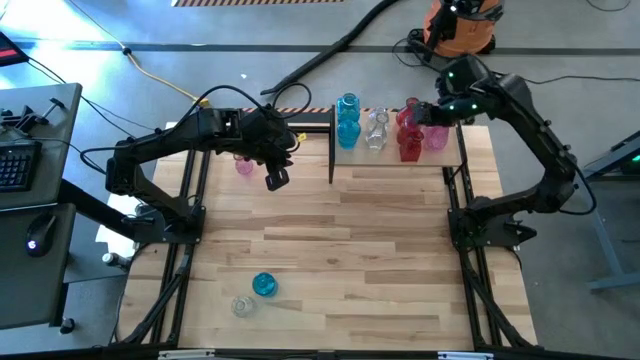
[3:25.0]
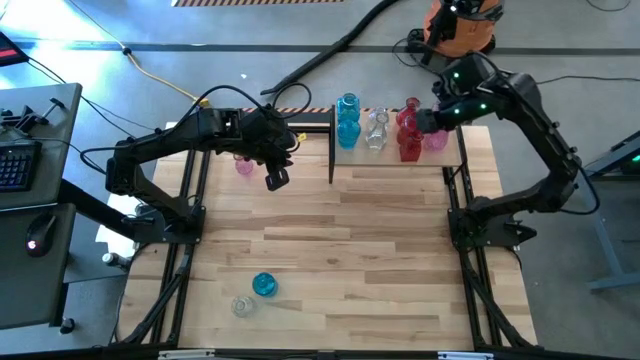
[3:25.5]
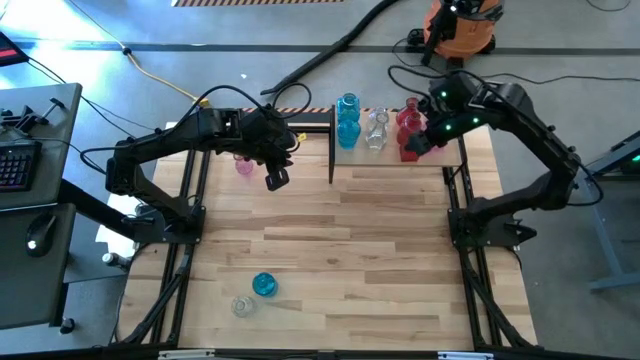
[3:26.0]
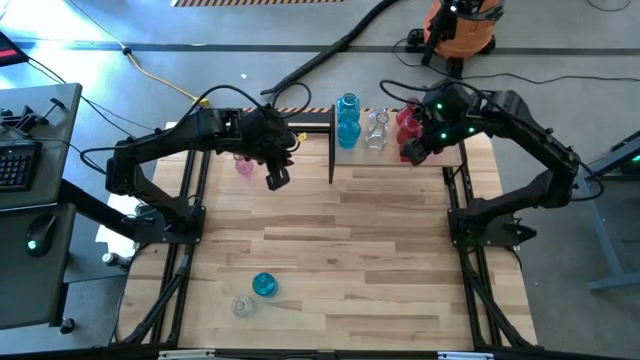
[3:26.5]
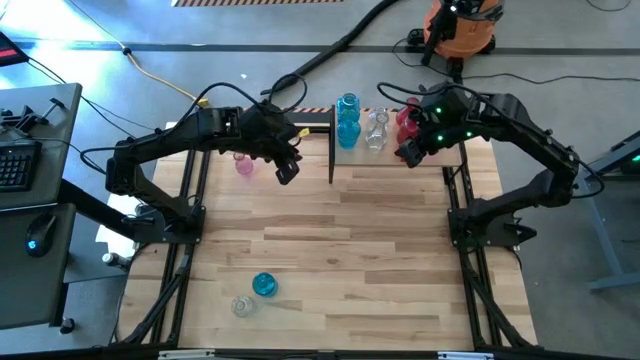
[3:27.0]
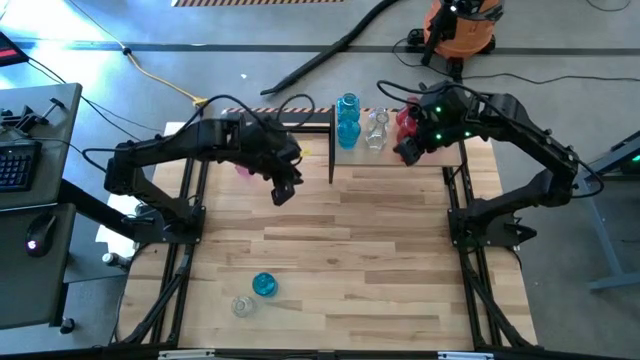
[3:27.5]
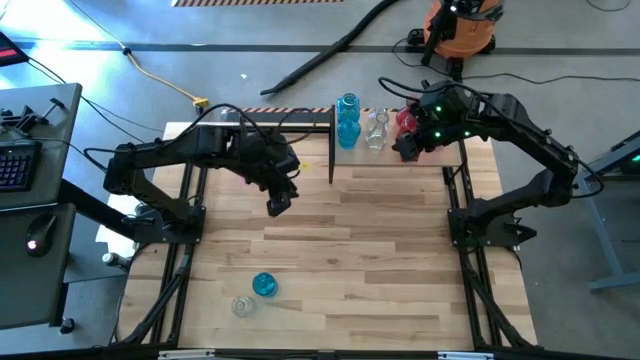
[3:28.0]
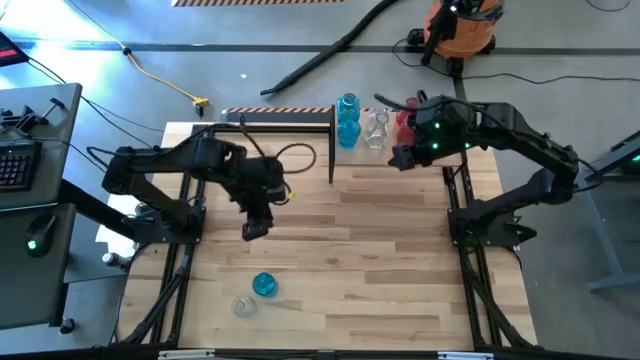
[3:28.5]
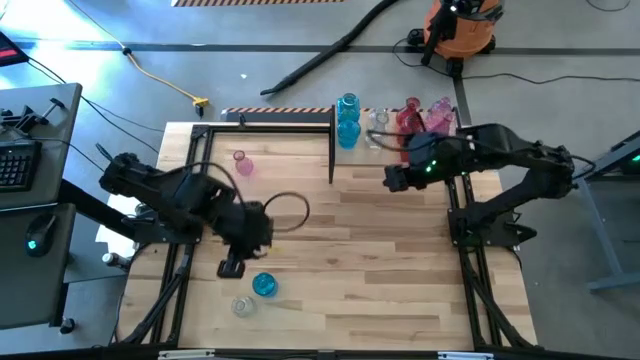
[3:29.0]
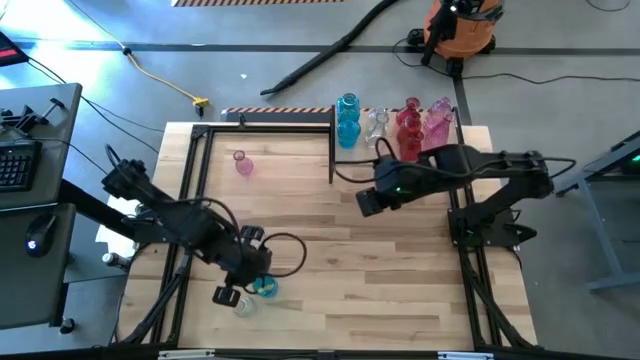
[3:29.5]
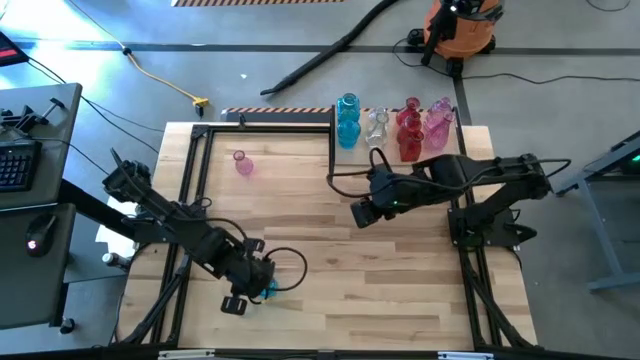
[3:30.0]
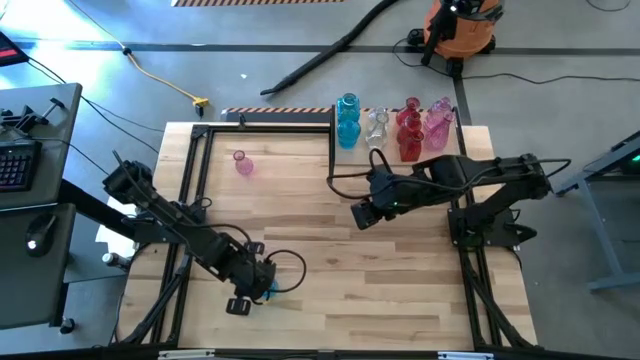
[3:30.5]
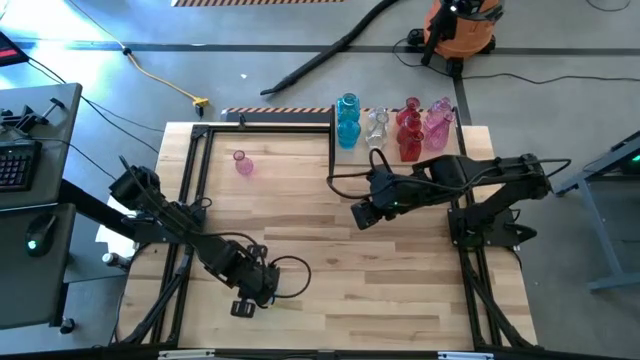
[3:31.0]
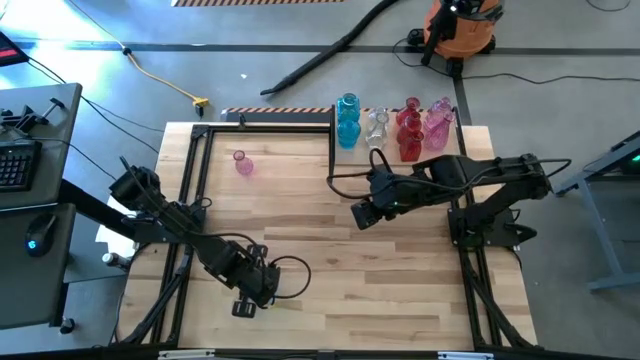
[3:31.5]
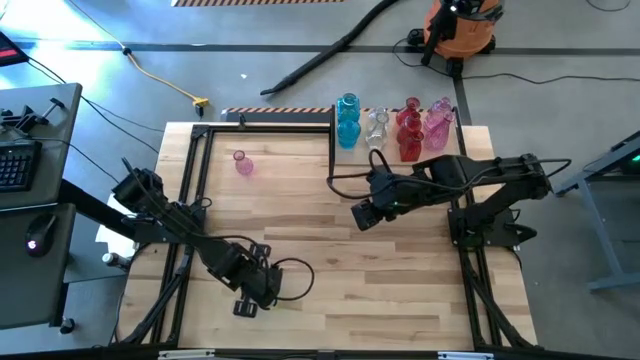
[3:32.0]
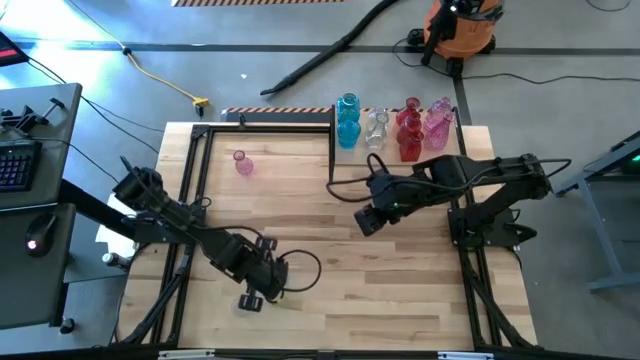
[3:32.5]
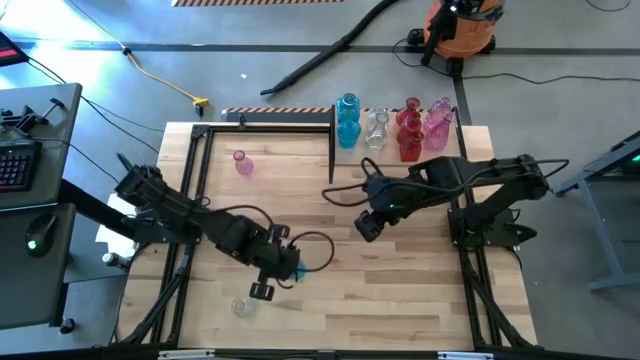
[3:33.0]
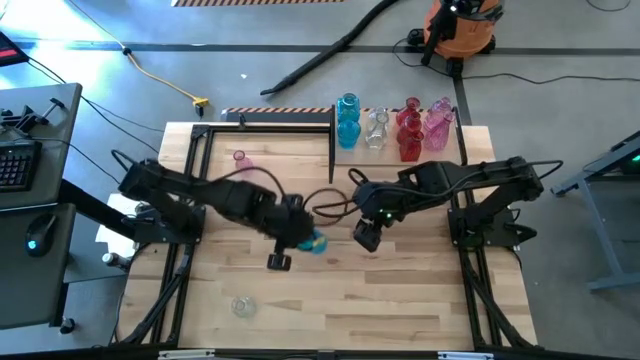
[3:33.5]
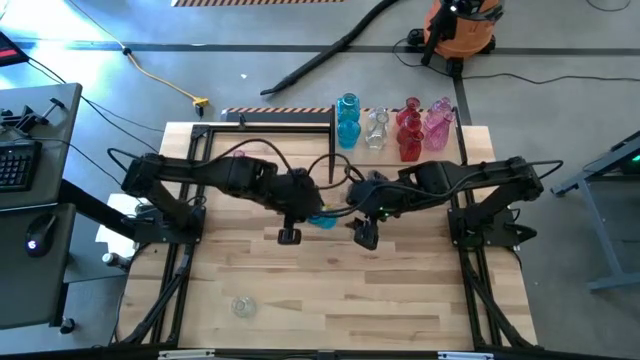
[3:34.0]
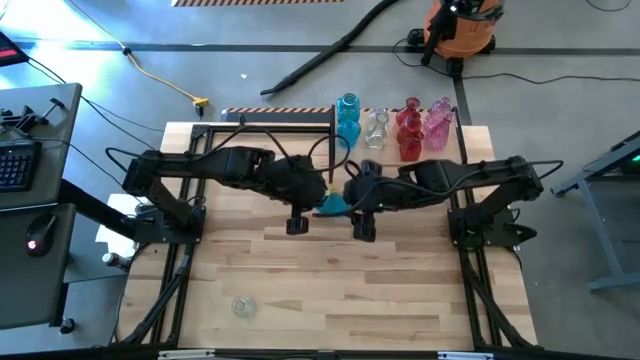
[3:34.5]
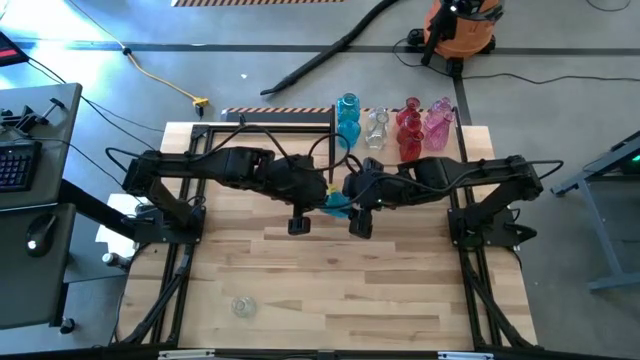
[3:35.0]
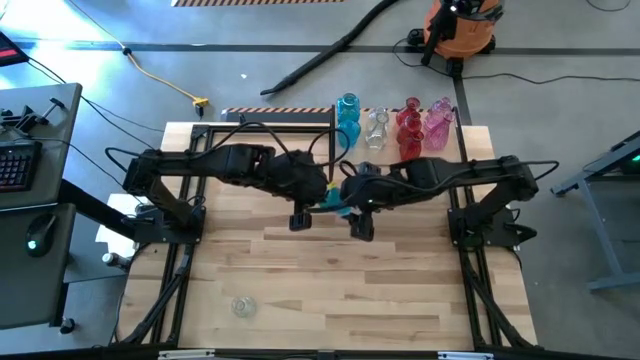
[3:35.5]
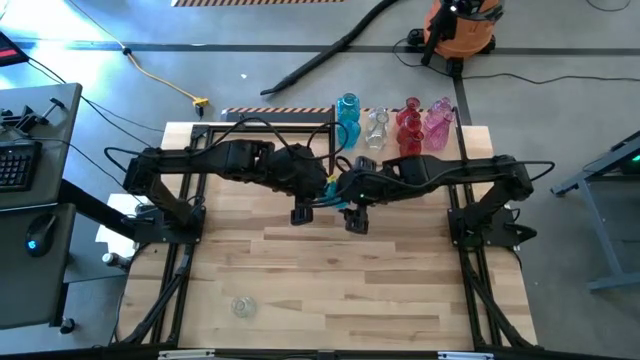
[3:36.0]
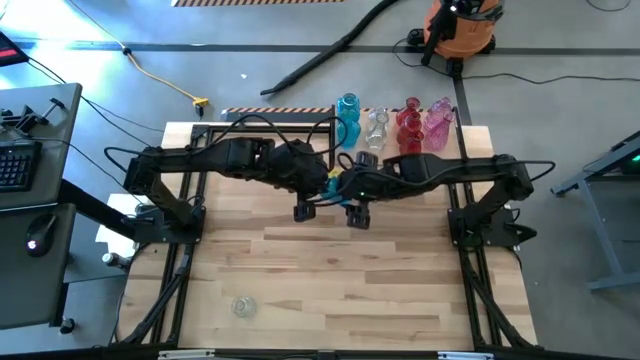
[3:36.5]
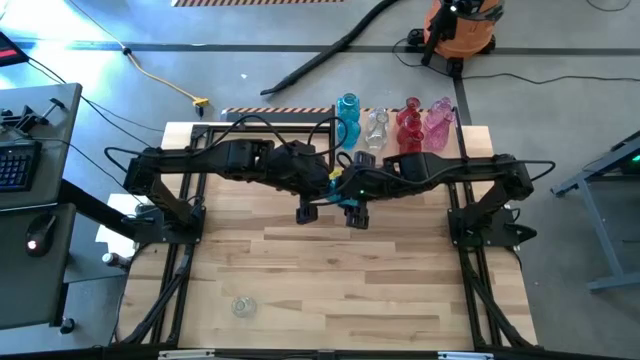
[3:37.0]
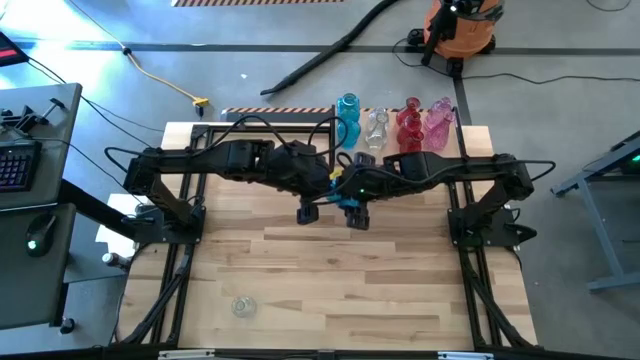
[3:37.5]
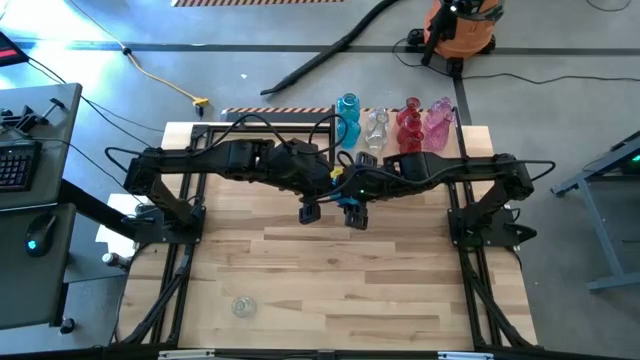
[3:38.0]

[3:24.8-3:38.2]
Task: sort vases onto shelf
Put the blue vase on the shelf aligned with the other blue vase

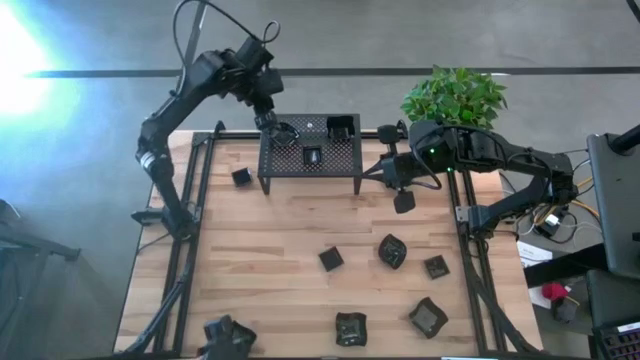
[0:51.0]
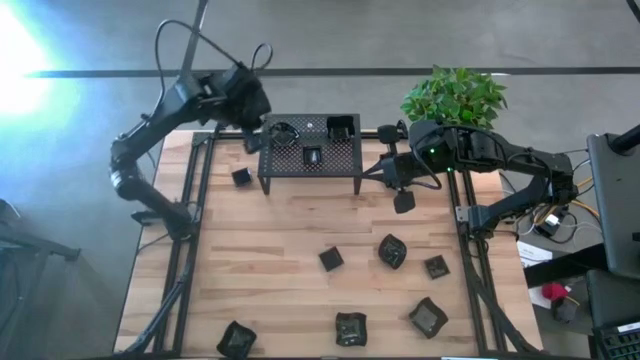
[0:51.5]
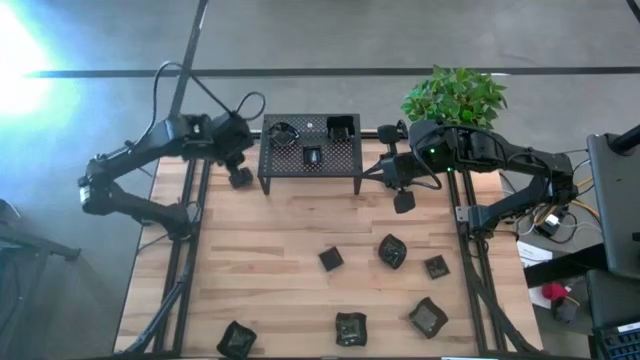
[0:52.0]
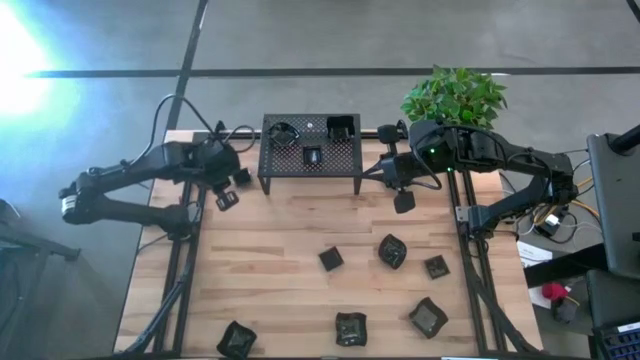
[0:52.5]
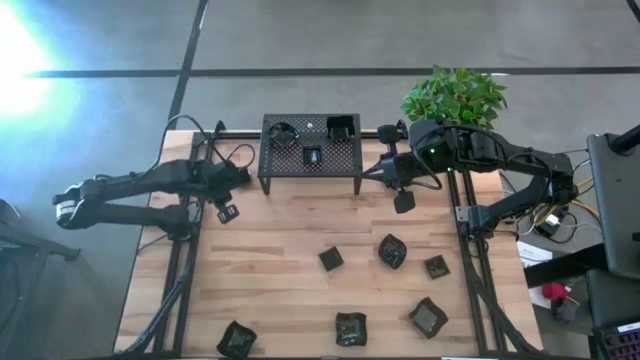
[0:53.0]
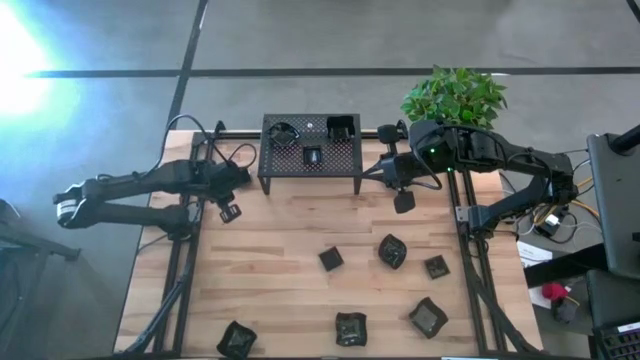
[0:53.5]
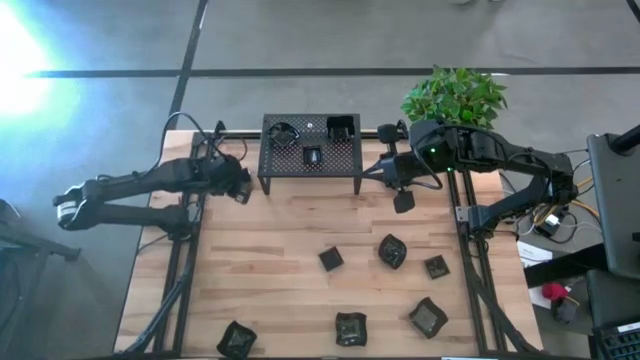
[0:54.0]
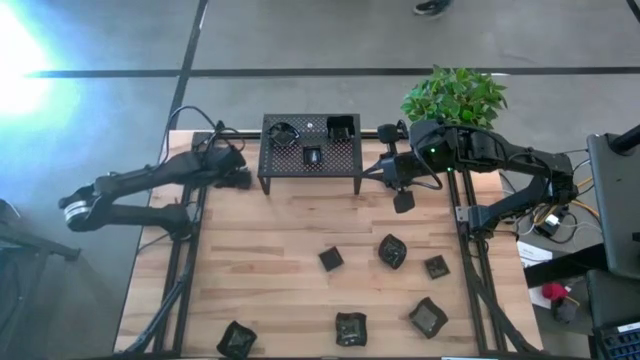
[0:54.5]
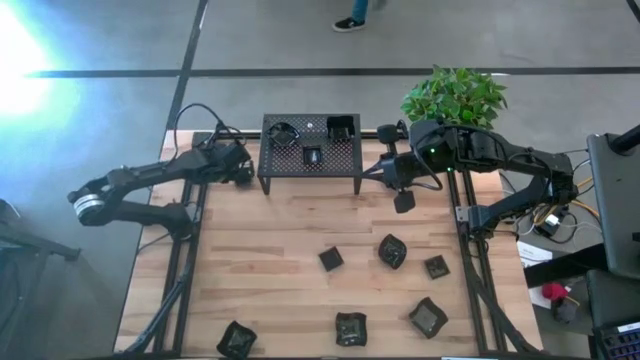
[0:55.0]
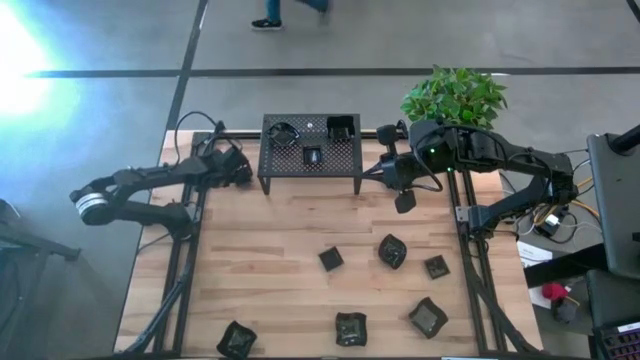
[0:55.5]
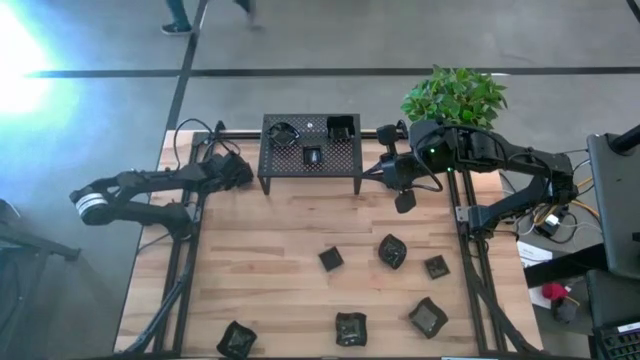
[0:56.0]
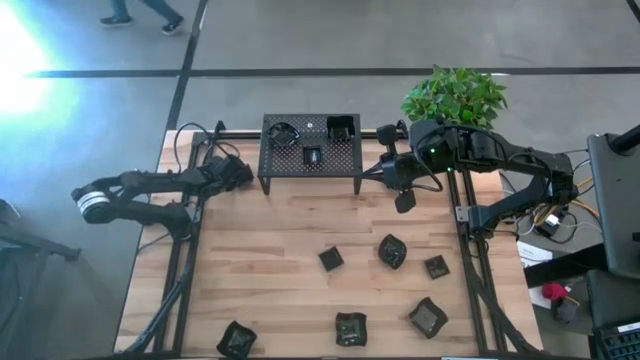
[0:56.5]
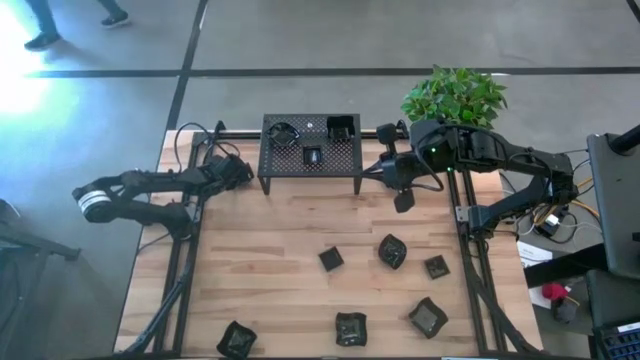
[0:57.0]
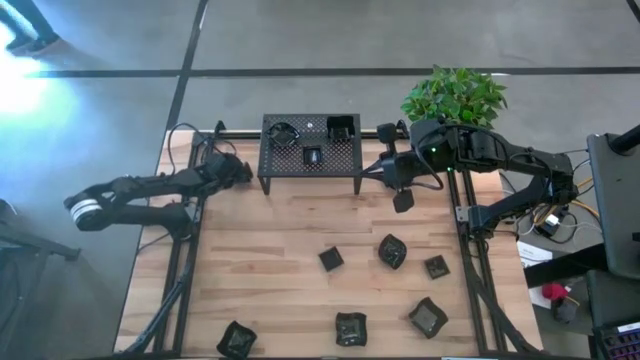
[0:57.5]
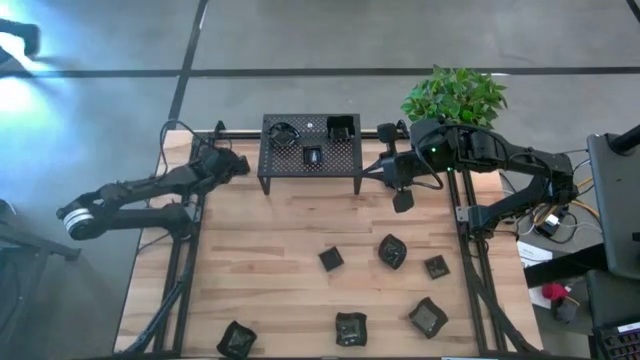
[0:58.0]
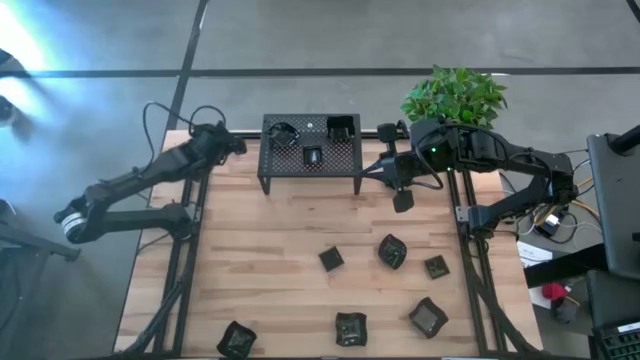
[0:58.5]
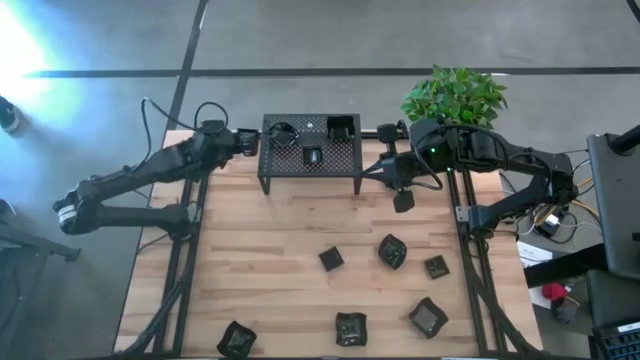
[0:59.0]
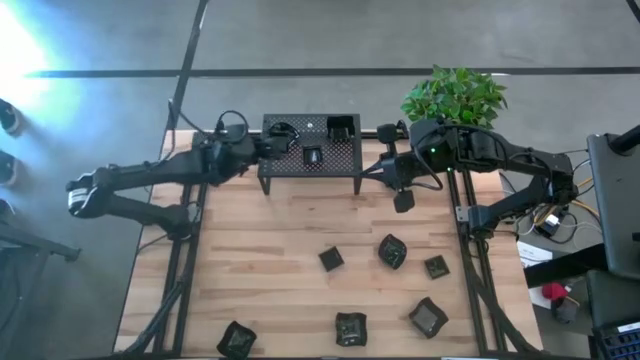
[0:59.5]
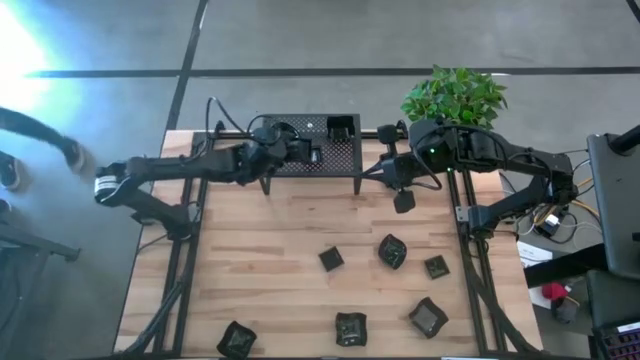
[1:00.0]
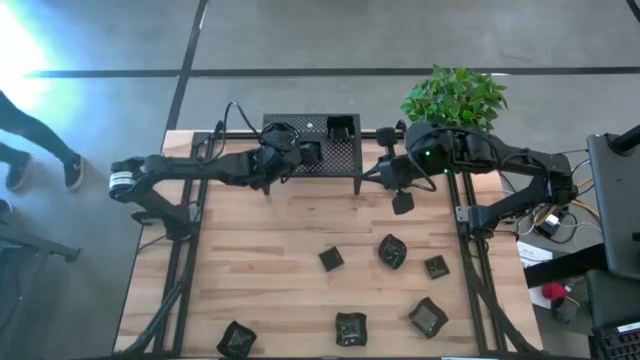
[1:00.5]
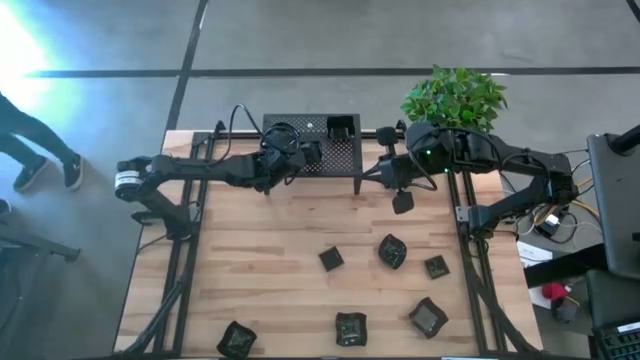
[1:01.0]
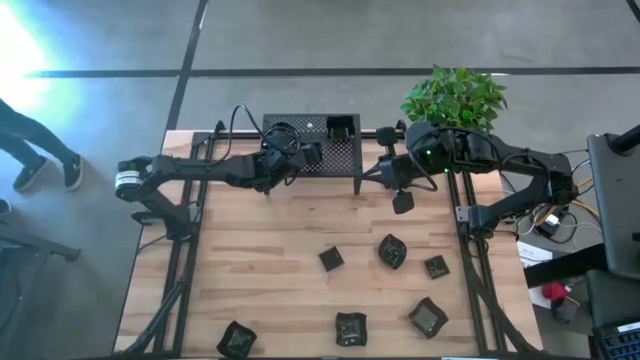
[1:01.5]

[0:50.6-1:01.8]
Task: Pick & Place Mini shaped plates
Put the square plate on top of the square plate on the shelf
